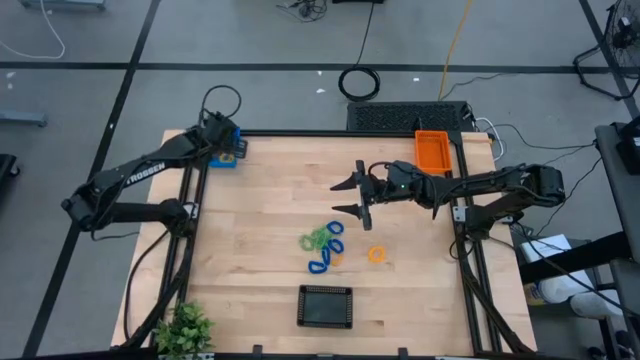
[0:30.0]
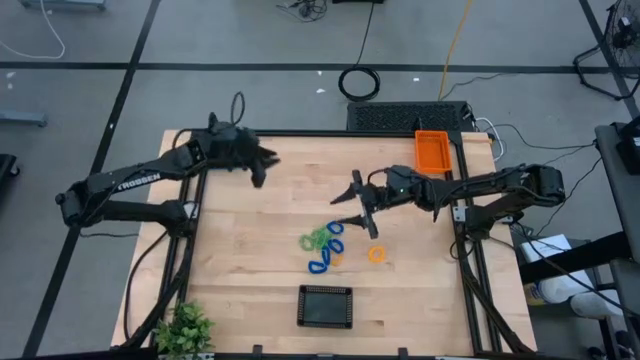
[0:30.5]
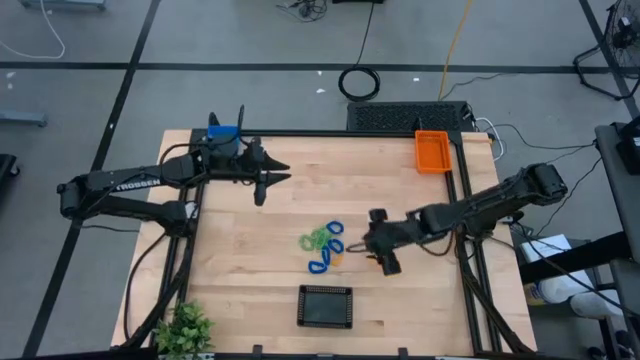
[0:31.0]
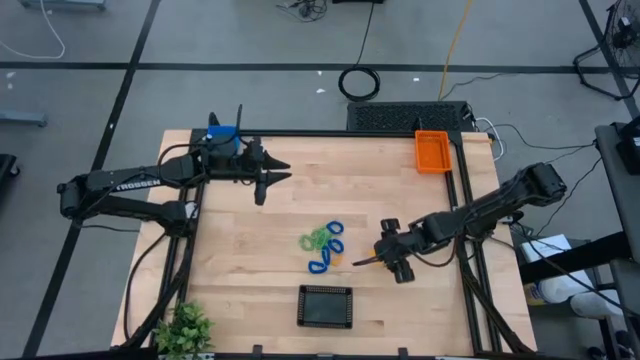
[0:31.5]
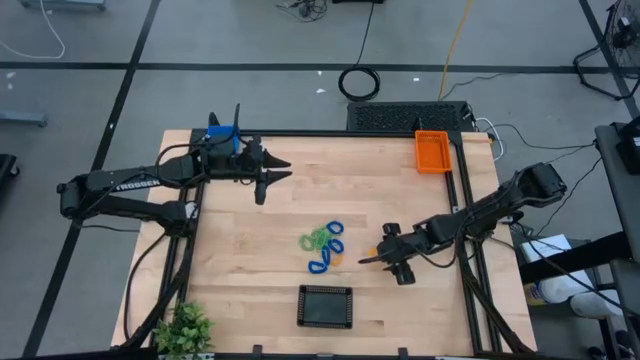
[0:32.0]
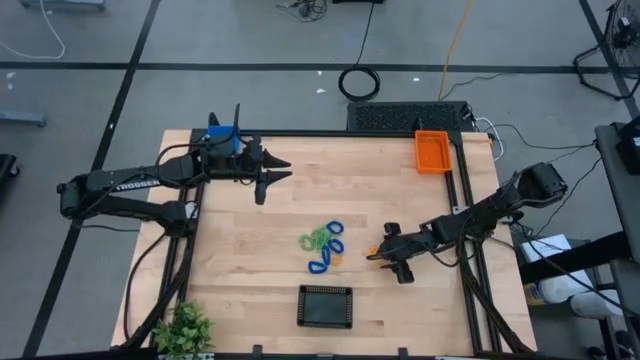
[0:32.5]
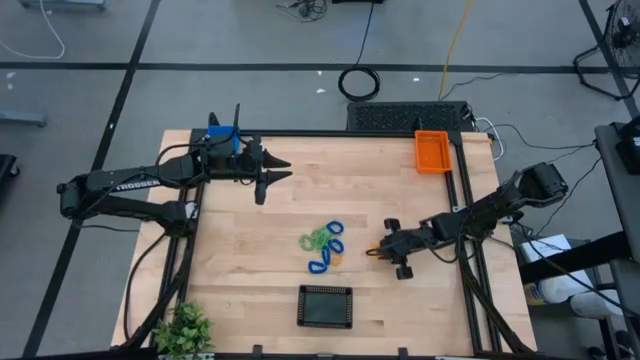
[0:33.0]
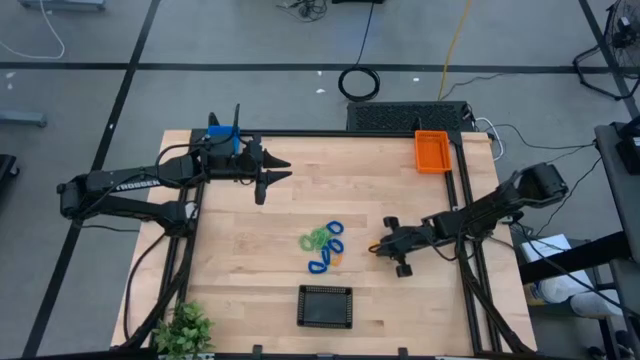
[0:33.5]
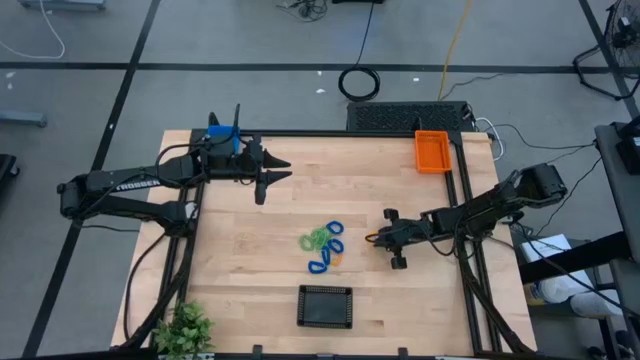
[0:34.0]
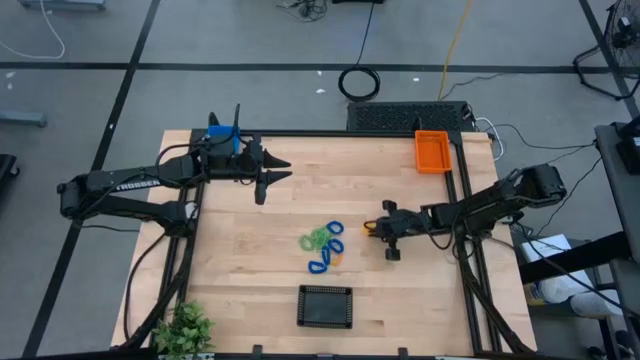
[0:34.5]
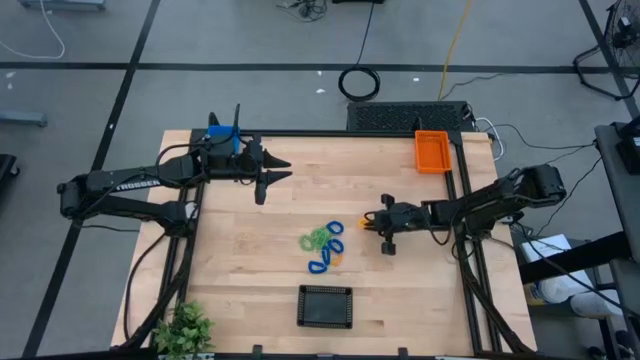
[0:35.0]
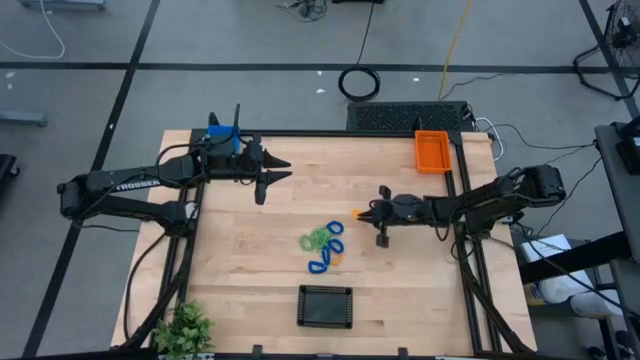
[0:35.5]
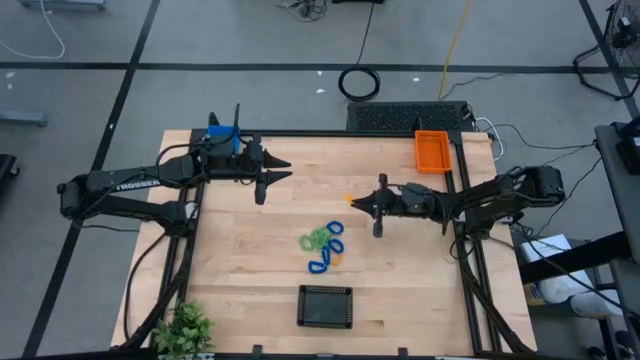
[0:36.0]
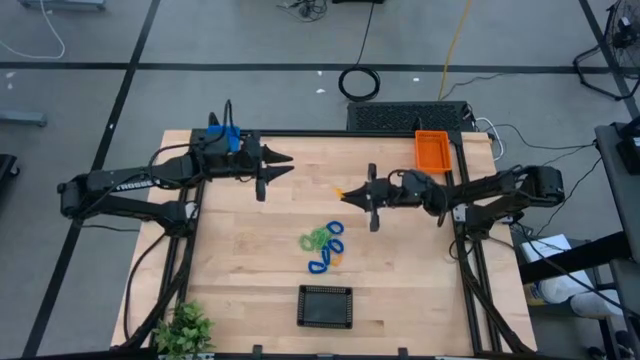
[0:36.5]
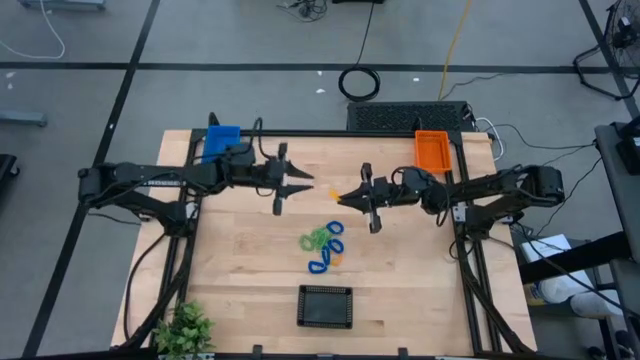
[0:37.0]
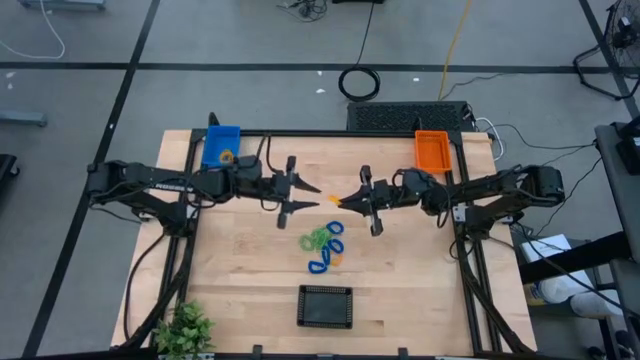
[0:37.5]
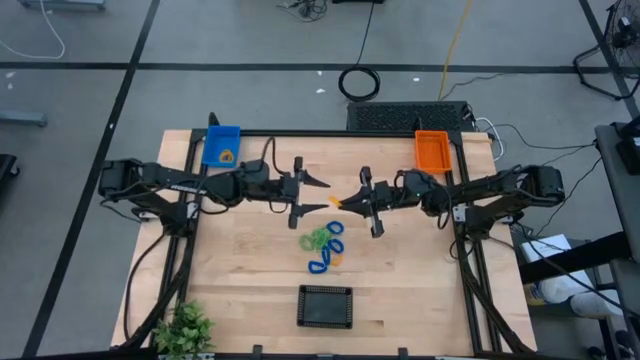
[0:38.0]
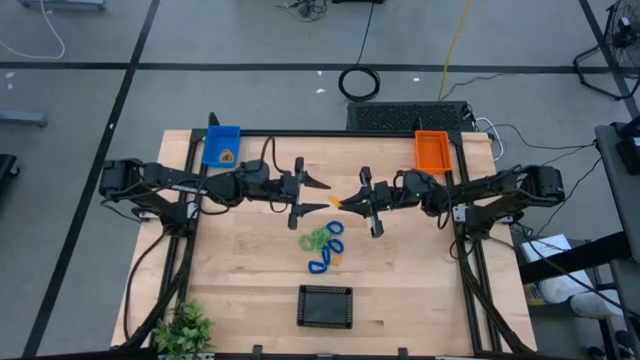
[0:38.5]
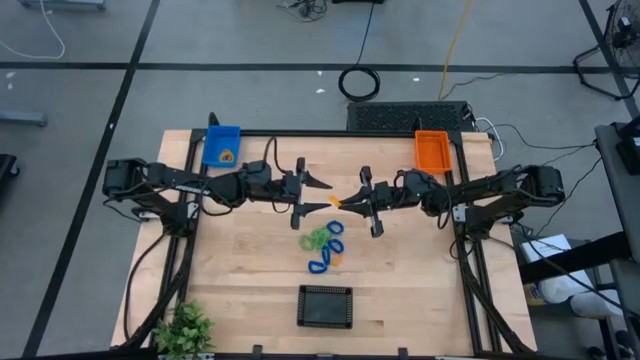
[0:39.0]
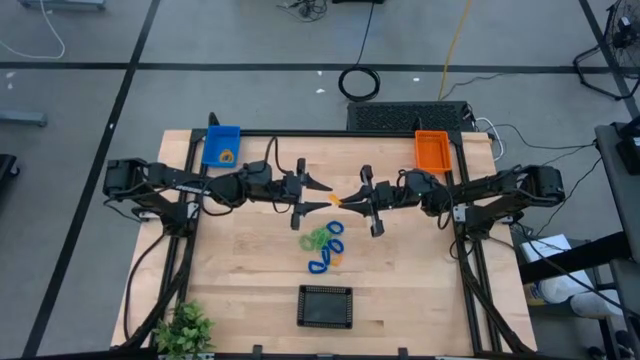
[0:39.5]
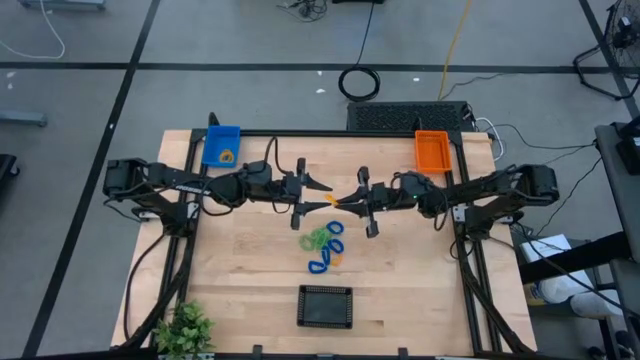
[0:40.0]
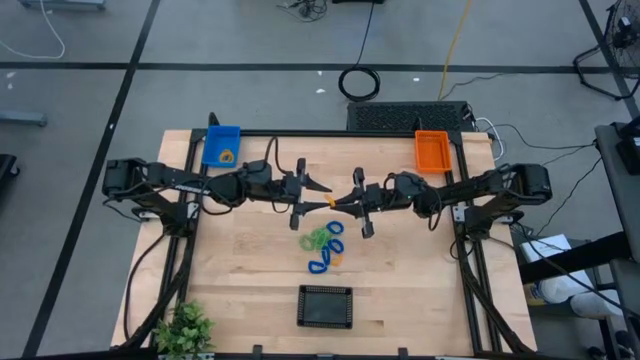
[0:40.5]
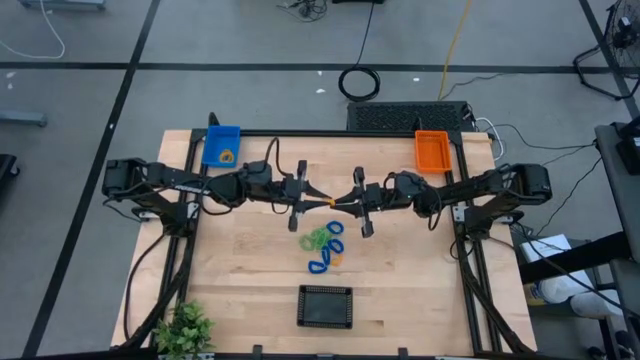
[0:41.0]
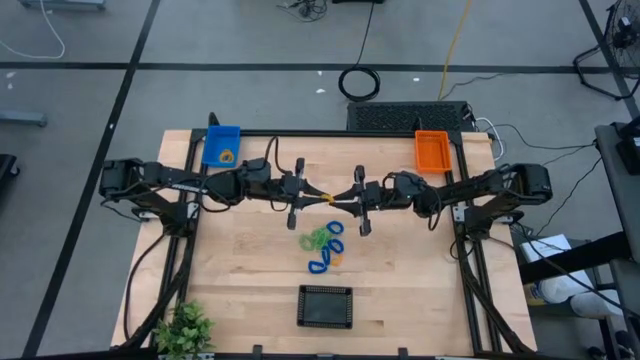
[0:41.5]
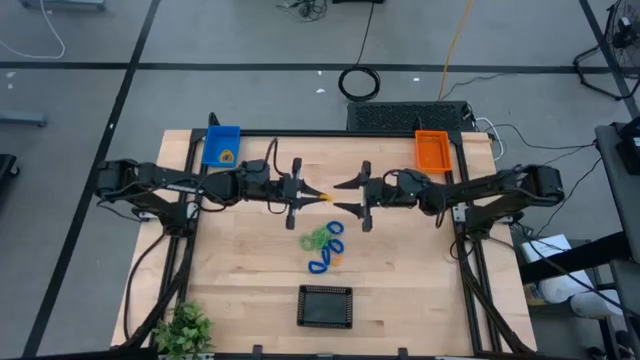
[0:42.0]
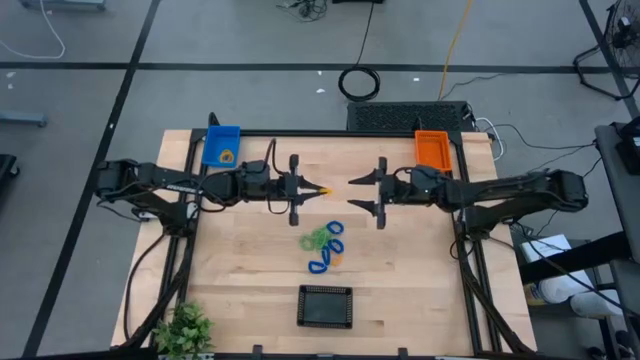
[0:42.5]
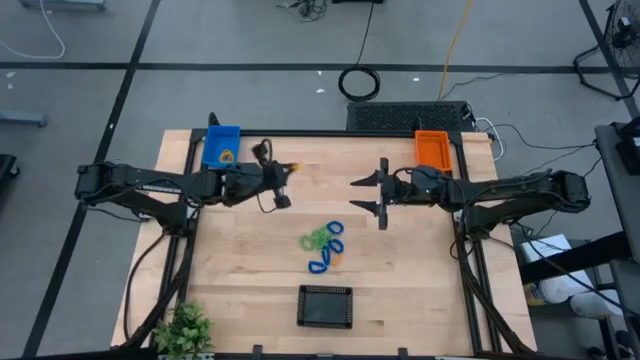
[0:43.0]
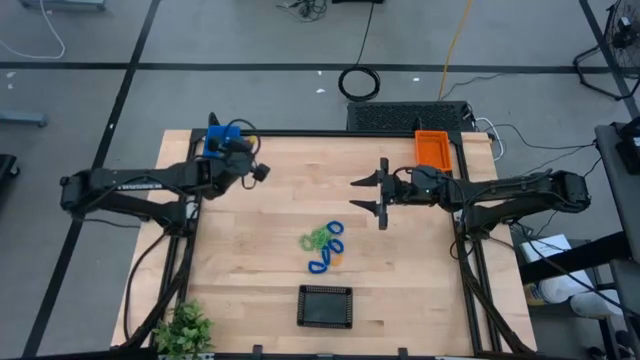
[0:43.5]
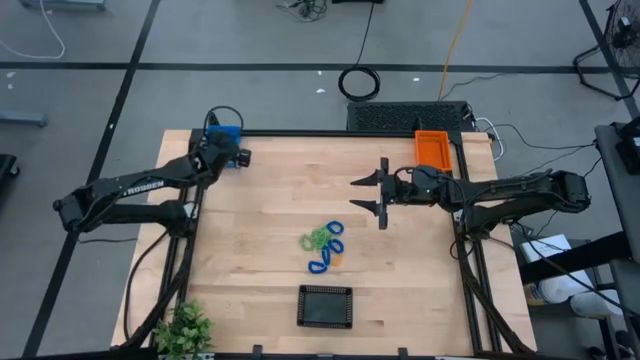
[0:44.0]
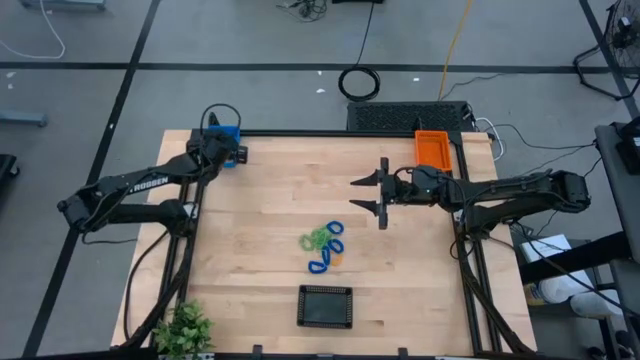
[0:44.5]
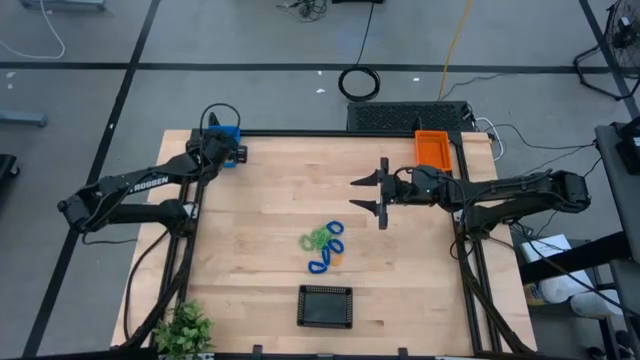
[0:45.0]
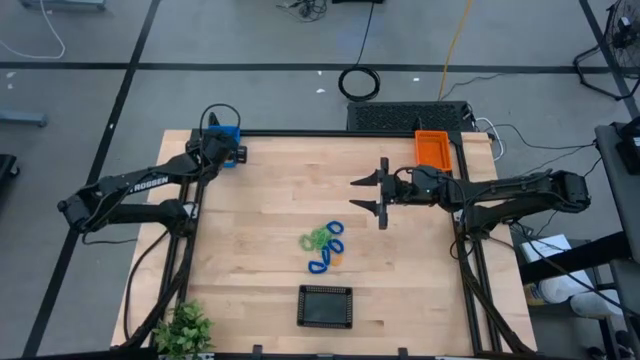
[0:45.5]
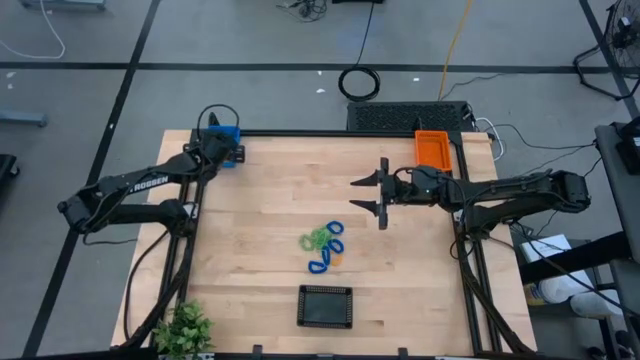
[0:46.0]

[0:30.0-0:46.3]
Task: Sort spring keychains into baskets
Put the orange spring keychain into the blue basket

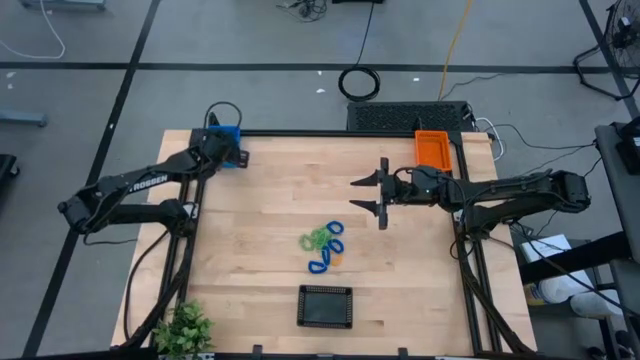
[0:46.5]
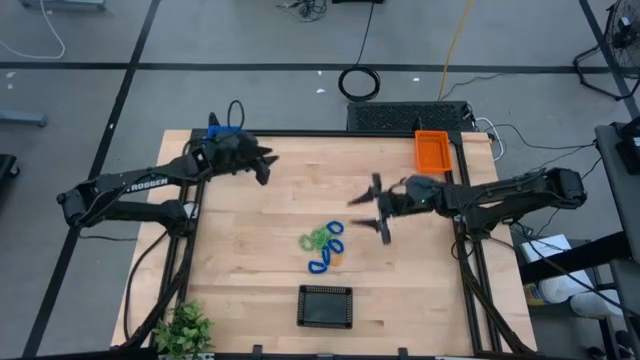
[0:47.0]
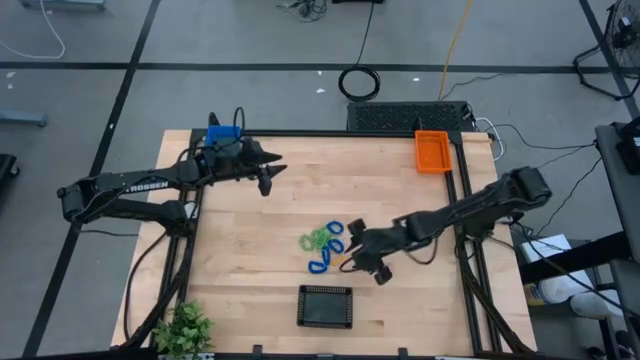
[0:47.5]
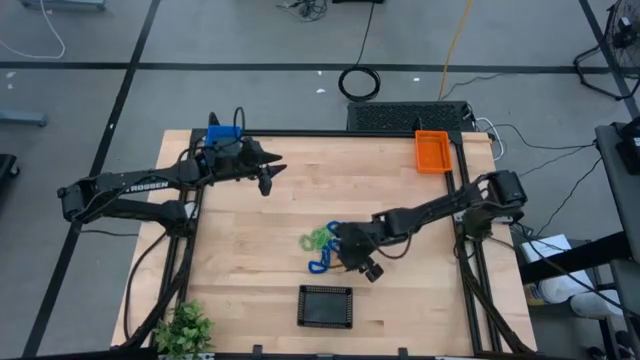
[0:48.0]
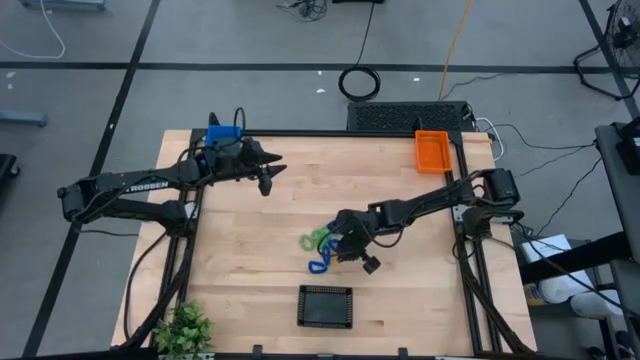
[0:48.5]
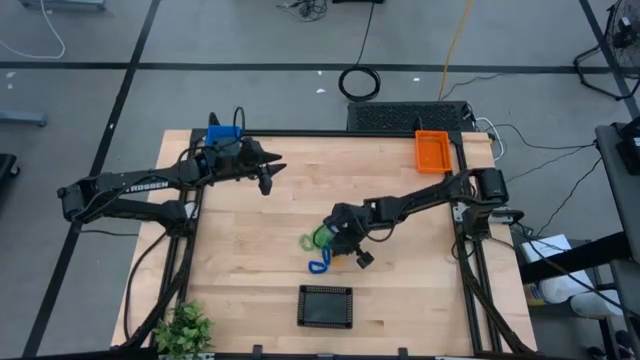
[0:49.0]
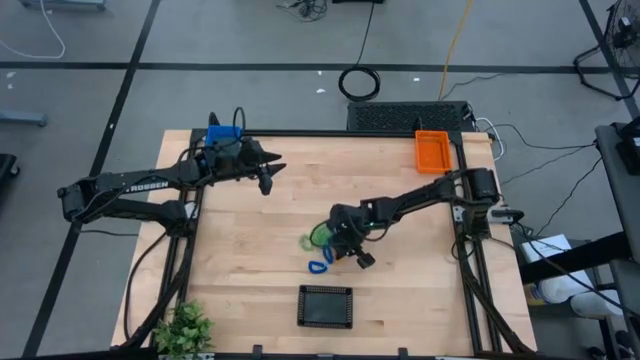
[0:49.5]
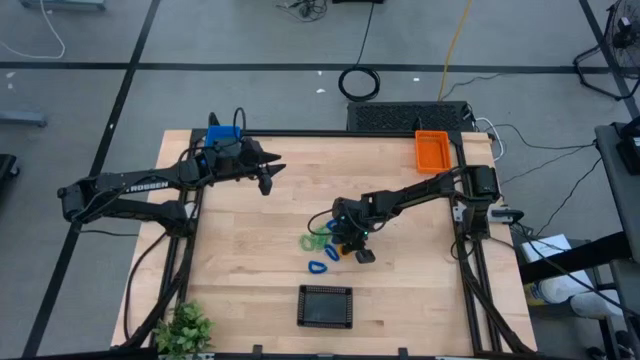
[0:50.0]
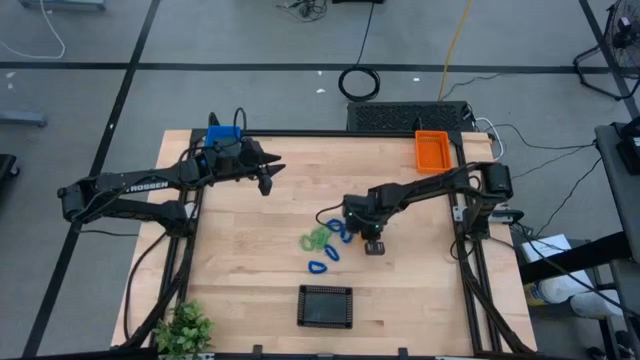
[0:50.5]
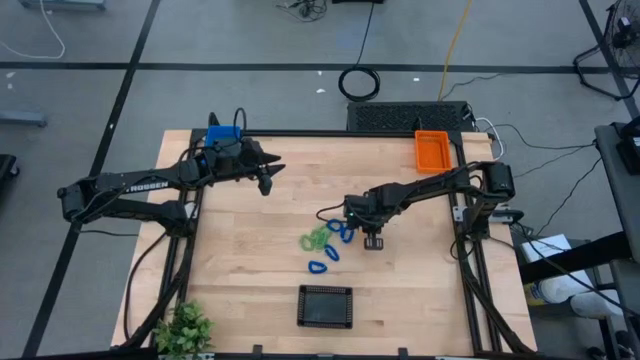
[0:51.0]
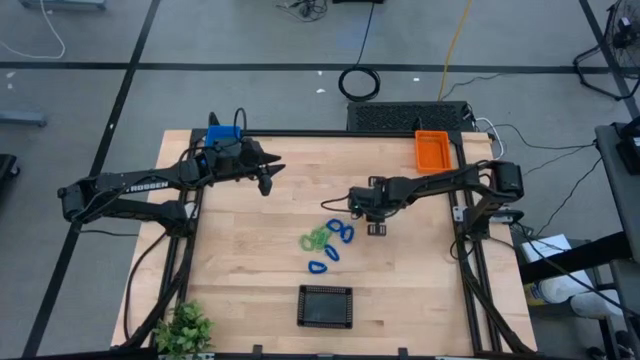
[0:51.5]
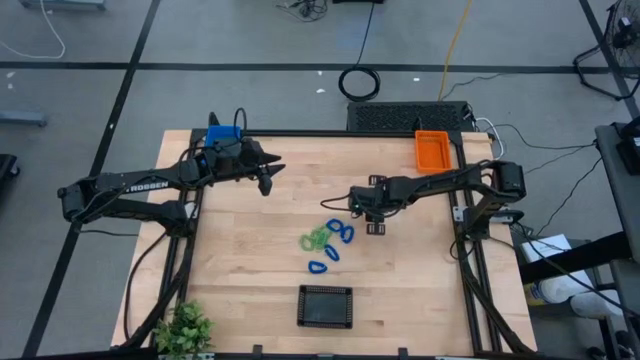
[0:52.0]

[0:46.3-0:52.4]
Put the orange spring keychain into the blue basket
